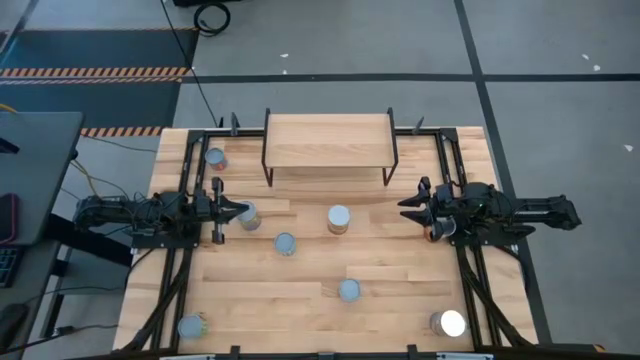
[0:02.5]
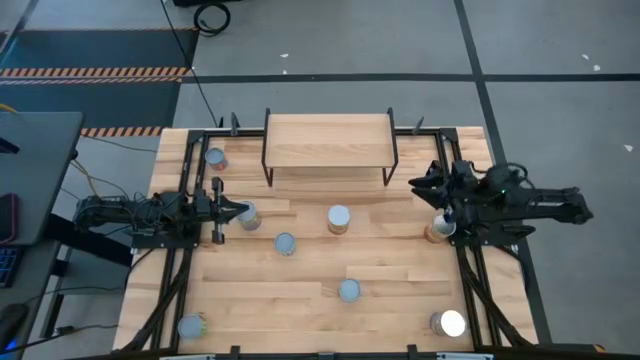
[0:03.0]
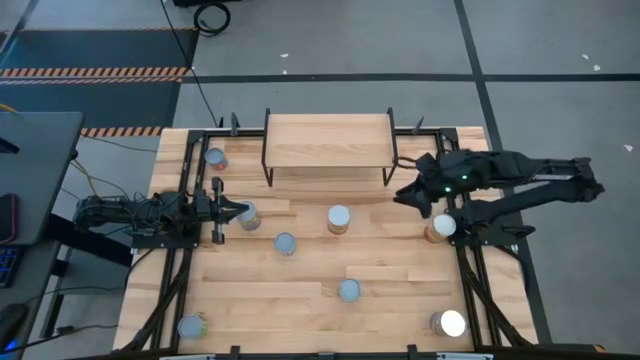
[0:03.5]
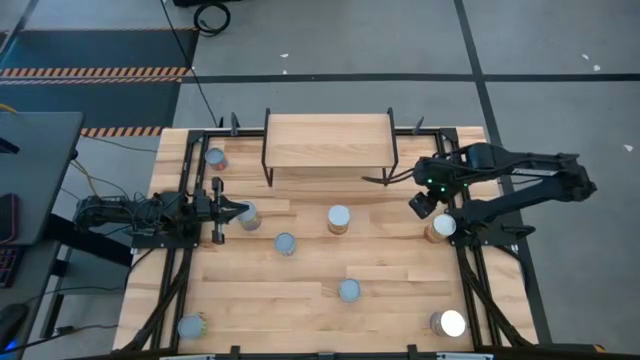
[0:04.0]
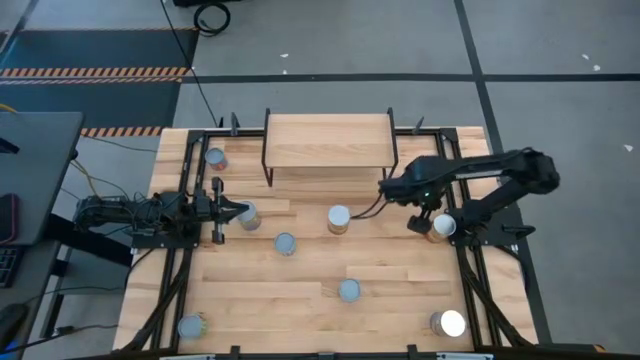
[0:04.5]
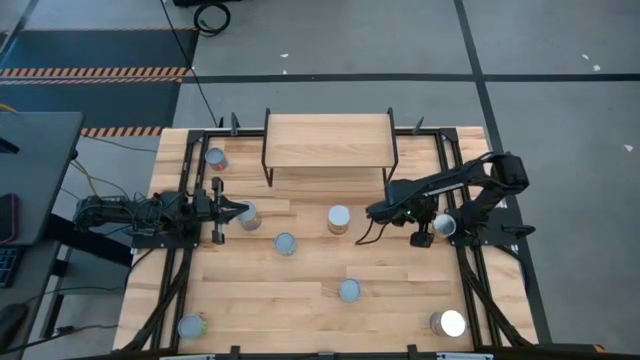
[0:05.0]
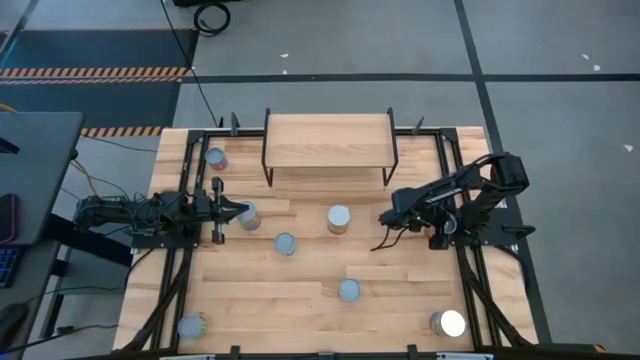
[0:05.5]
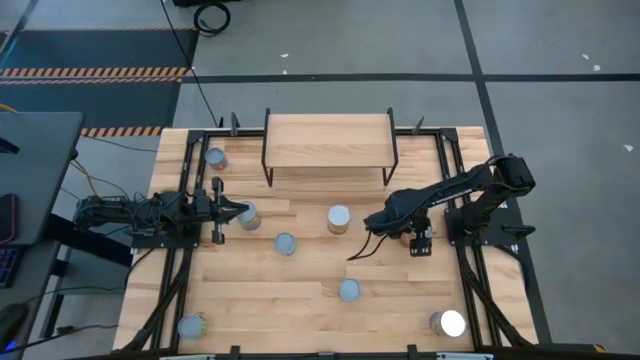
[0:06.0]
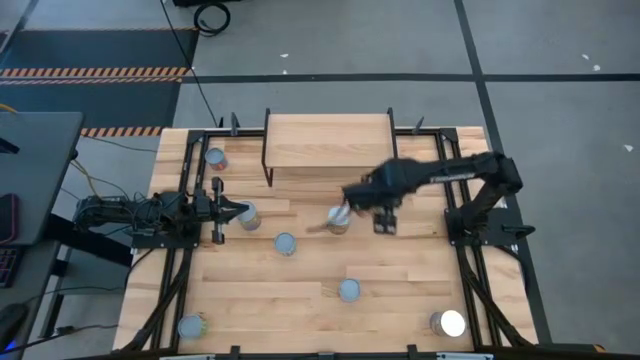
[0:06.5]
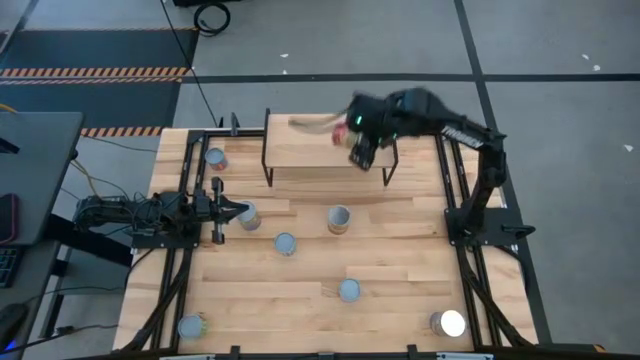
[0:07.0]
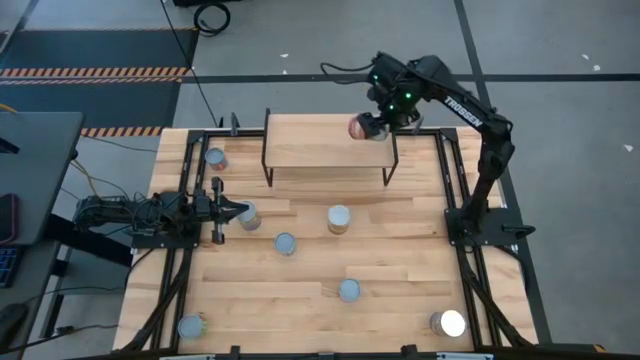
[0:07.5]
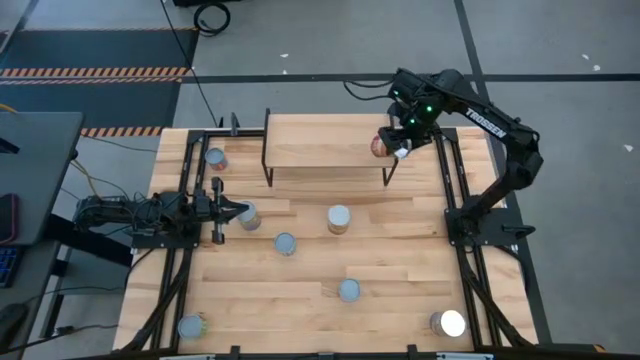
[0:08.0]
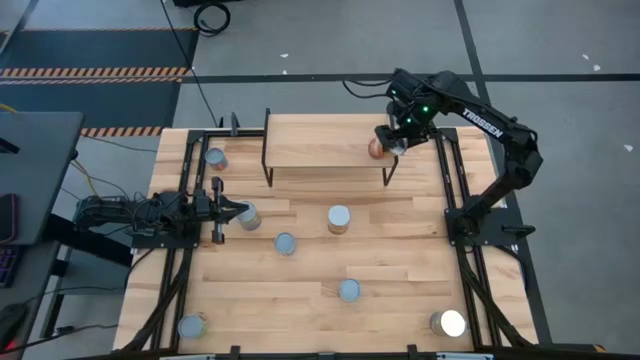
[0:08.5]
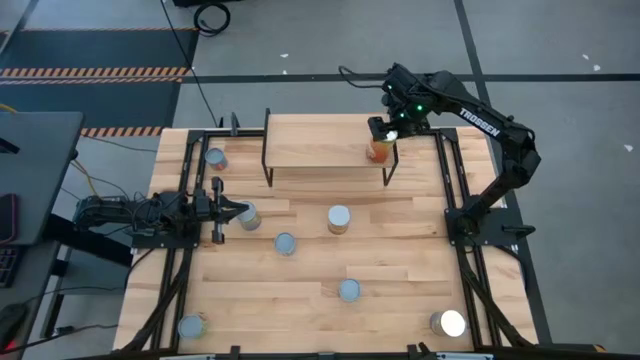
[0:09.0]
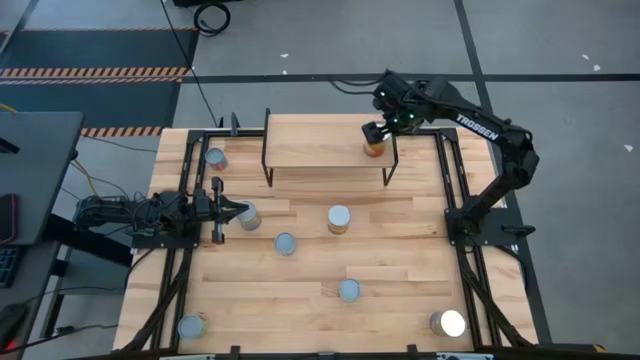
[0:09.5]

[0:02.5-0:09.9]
Task: Pick and place cans onto a shelf
Put the right large canned corn on the shelf

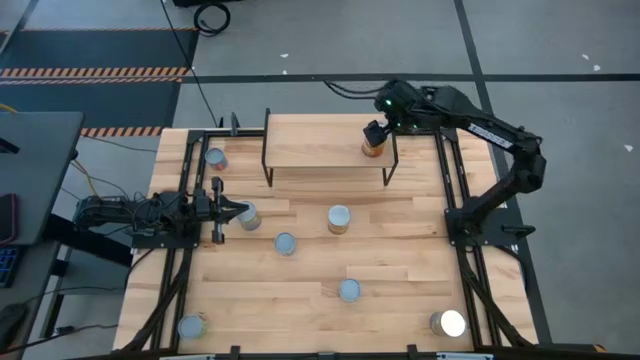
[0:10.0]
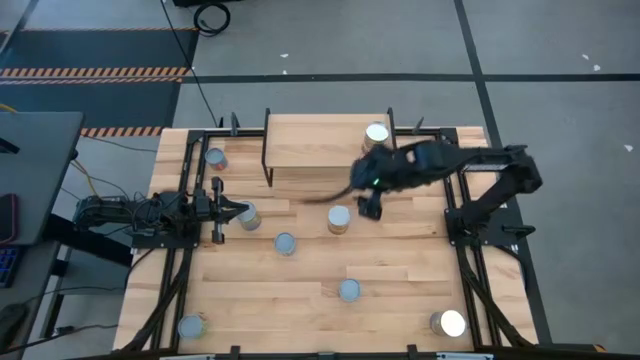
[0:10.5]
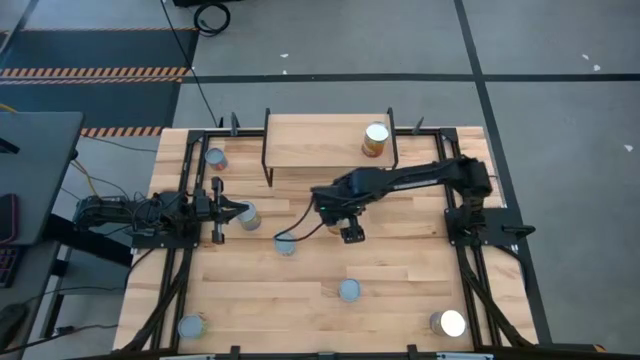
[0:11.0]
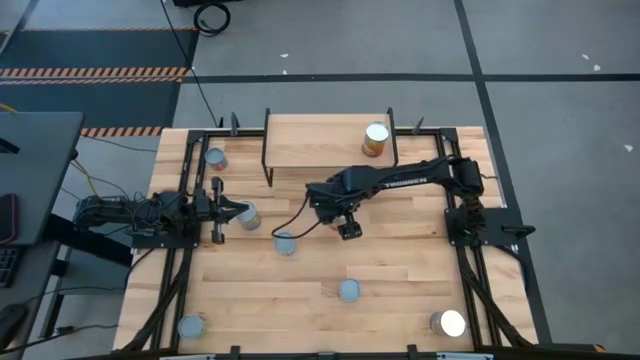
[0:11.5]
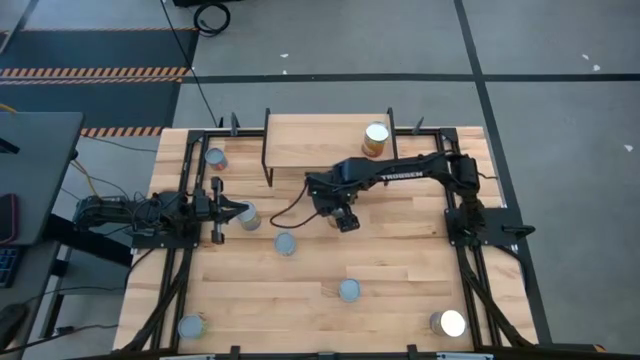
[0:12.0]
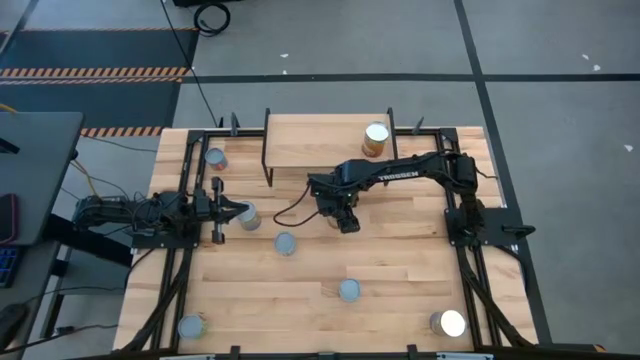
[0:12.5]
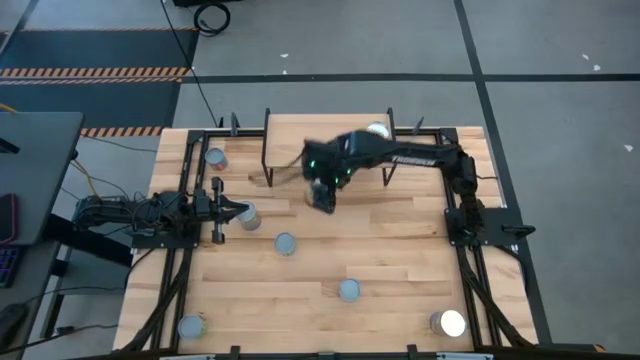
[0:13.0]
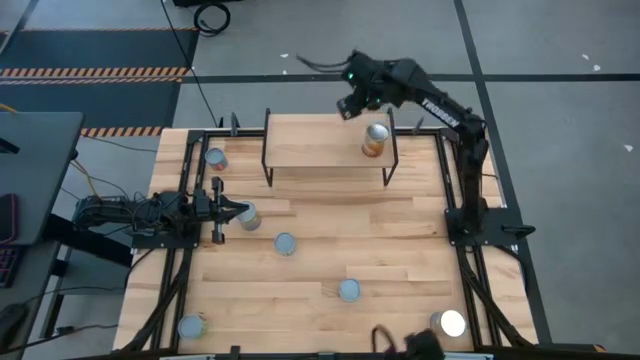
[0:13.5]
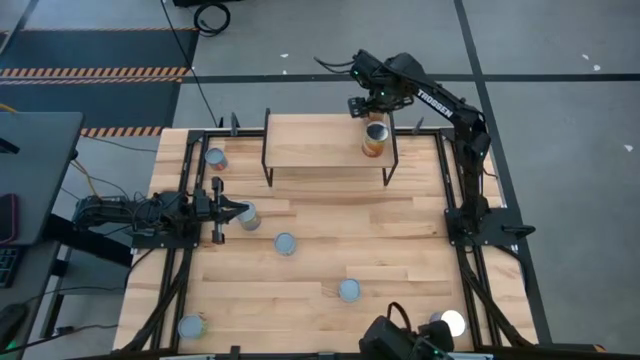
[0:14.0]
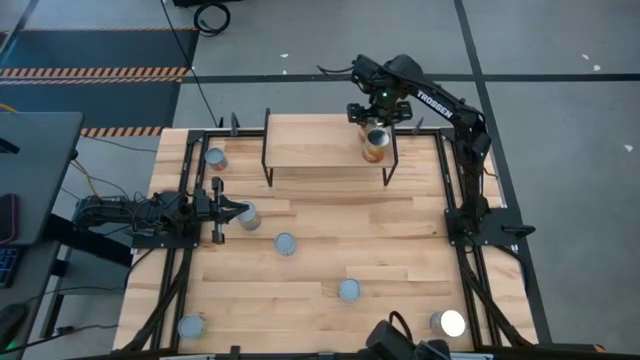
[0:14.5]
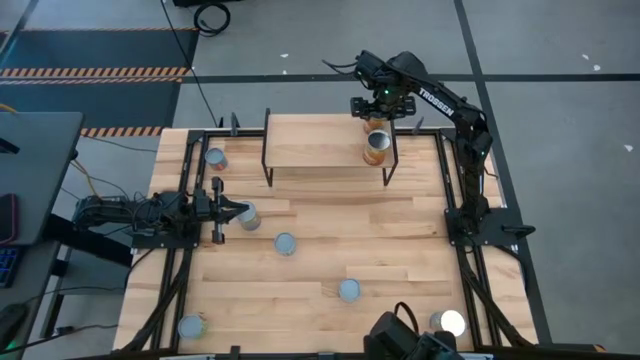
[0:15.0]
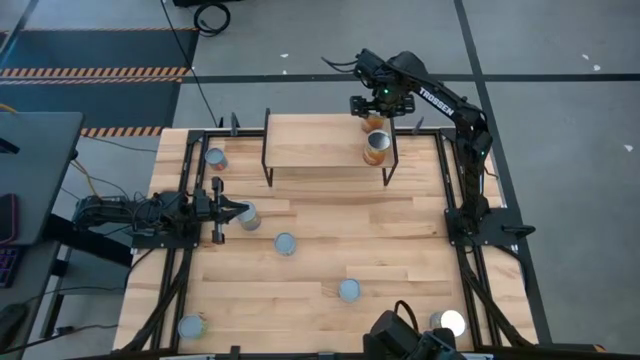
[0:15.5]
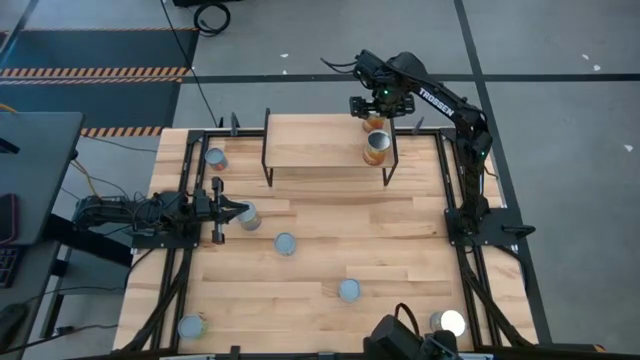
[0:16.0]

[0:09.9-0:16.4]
Put the large canned corn on the shelf aligned with the other large canned corn

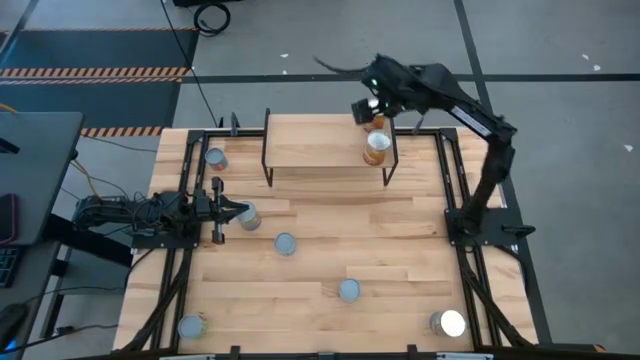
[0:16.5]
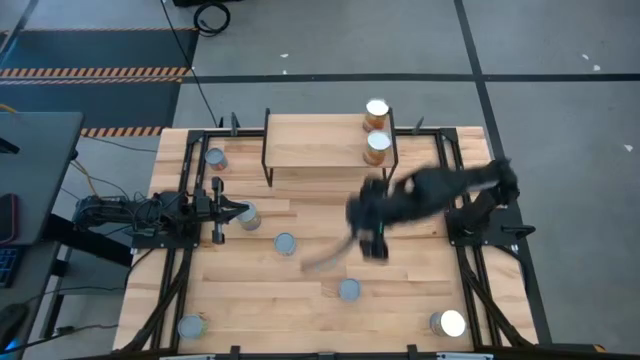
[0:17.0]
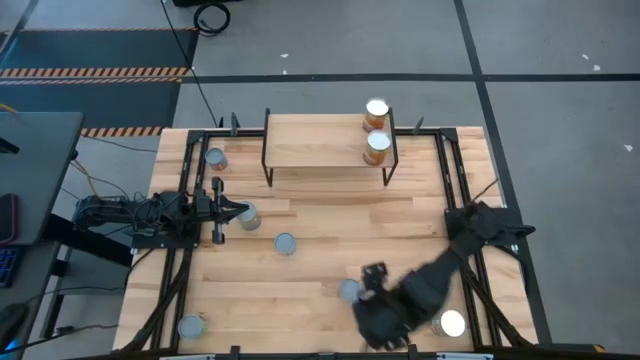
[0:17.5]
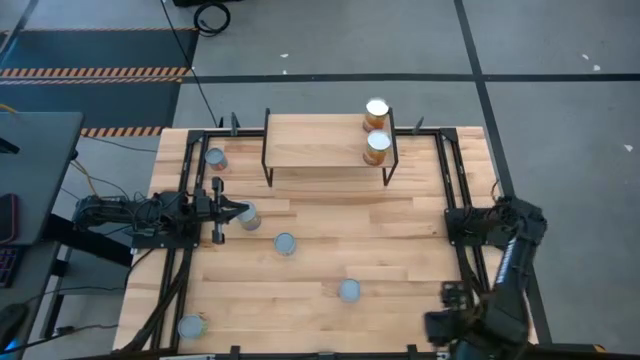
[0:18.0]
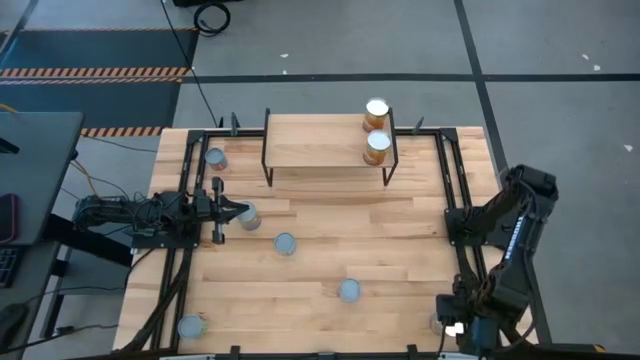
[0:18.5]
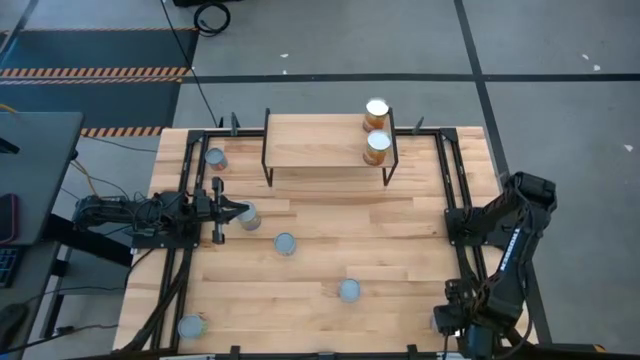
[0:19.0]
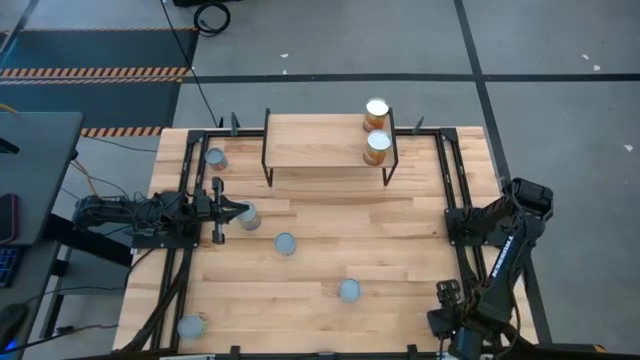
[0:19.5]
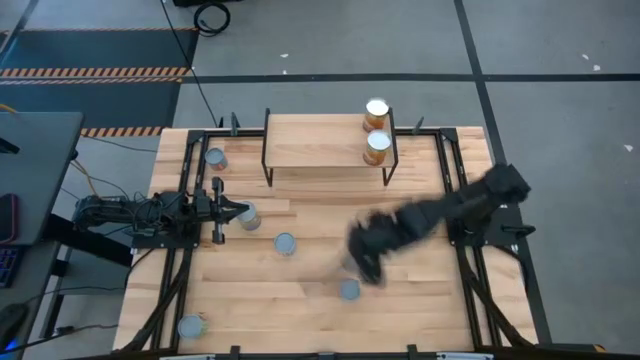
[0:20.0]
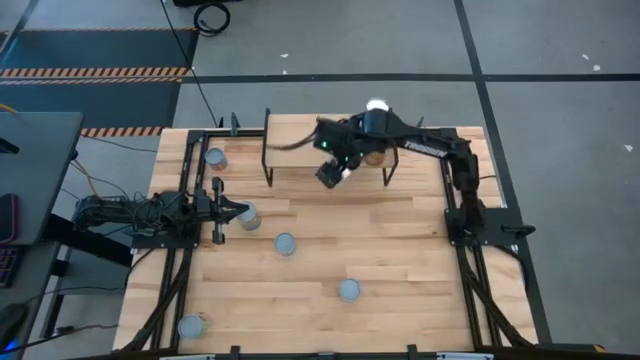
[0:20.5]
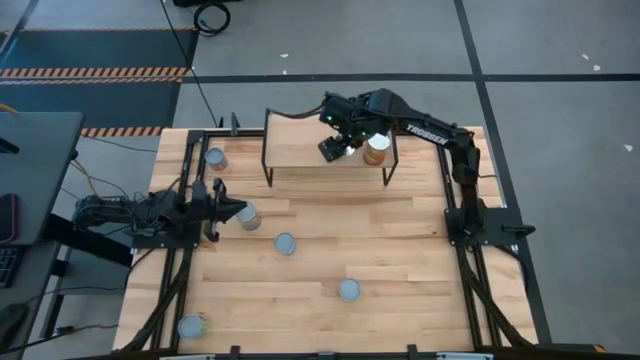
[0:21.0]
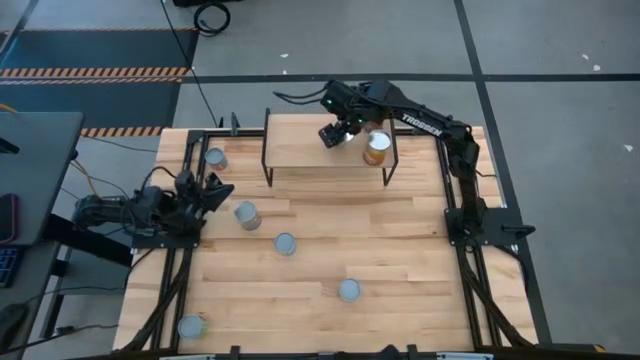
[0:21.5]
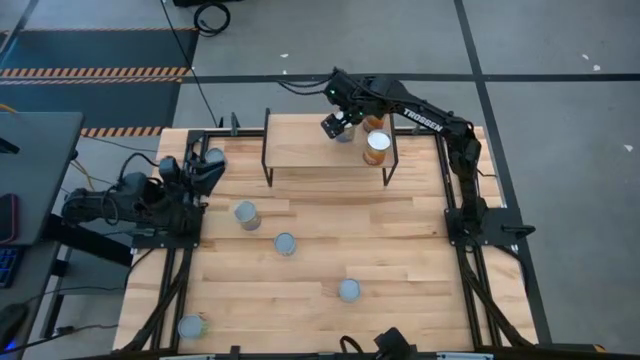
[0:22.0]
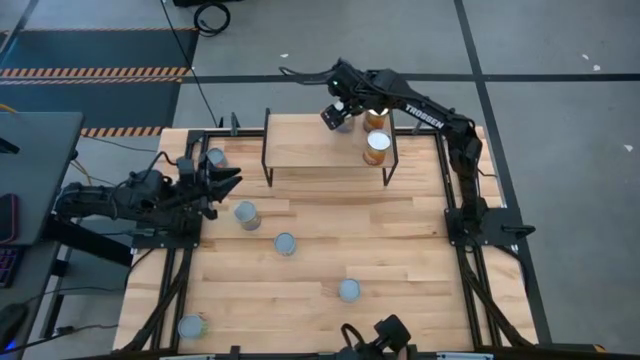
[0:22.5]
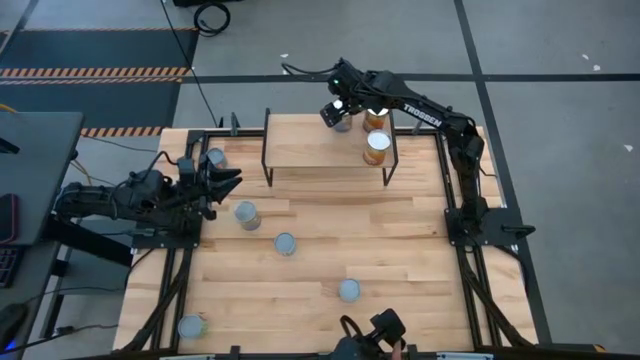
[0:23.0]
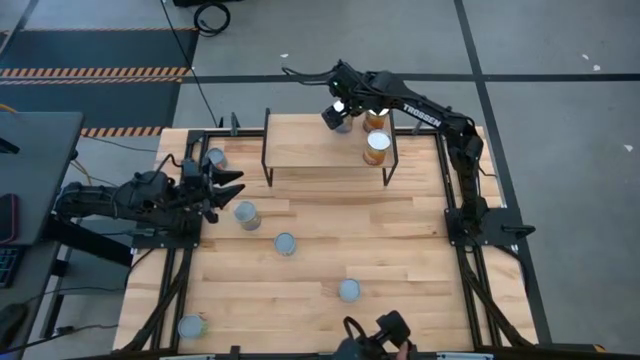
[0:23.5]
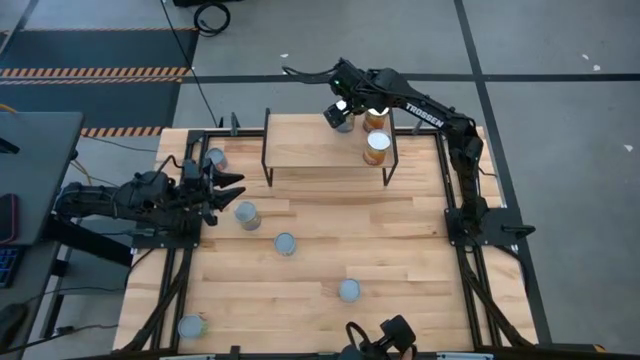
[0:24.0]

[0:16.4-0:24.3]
Put the bottom canned peaches on the shelf
